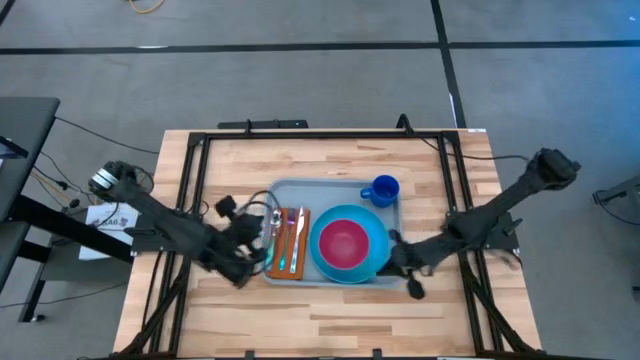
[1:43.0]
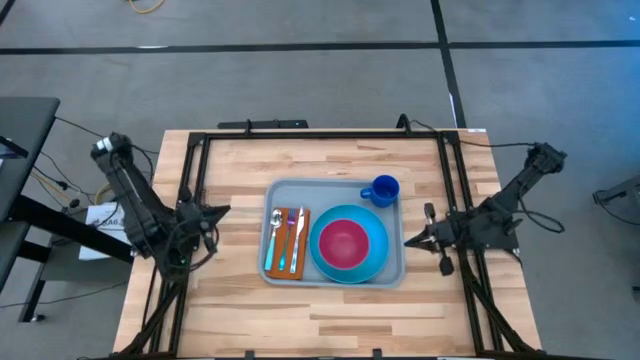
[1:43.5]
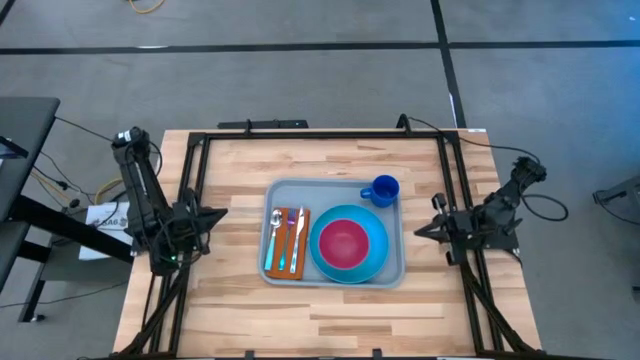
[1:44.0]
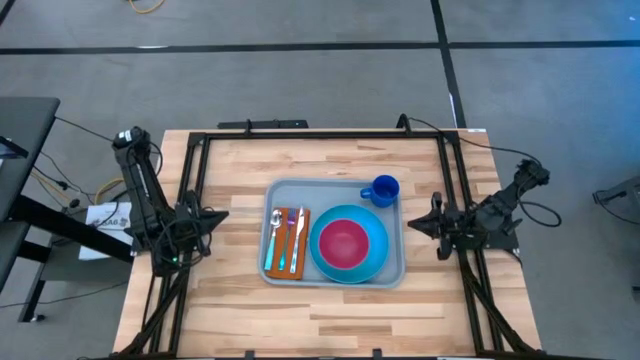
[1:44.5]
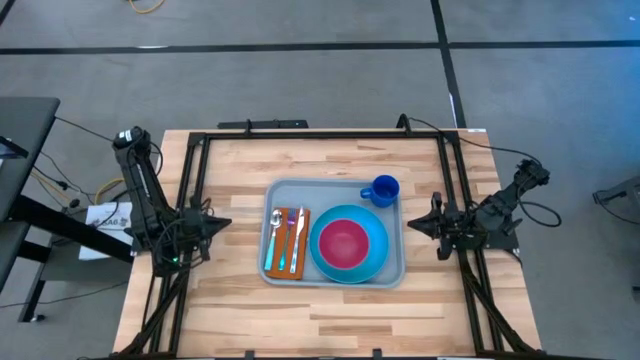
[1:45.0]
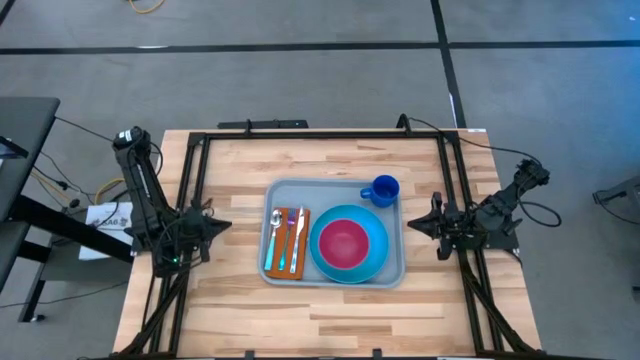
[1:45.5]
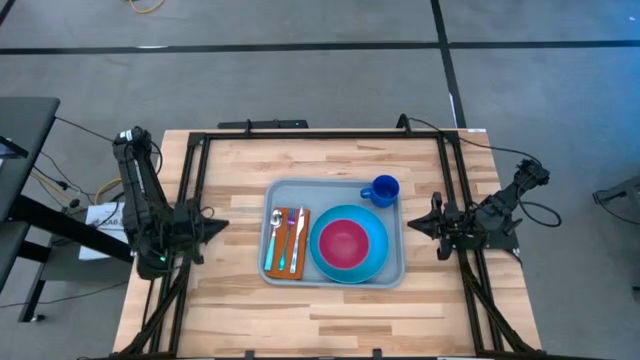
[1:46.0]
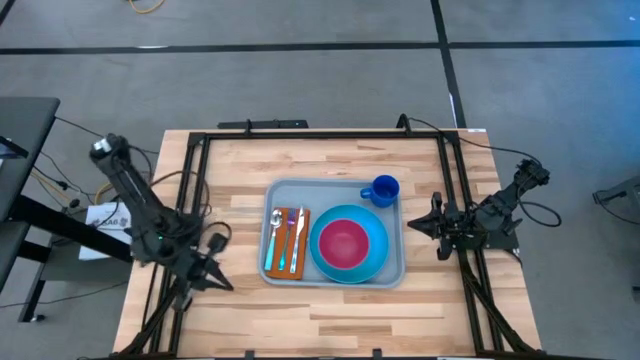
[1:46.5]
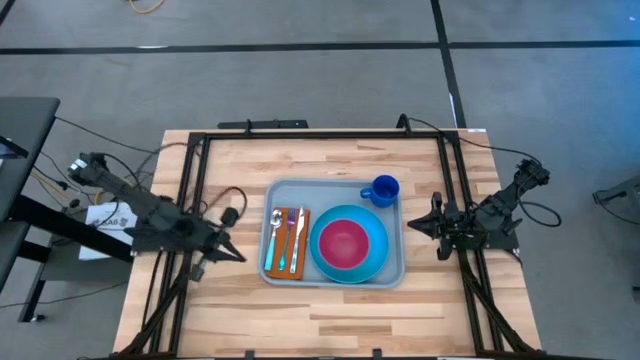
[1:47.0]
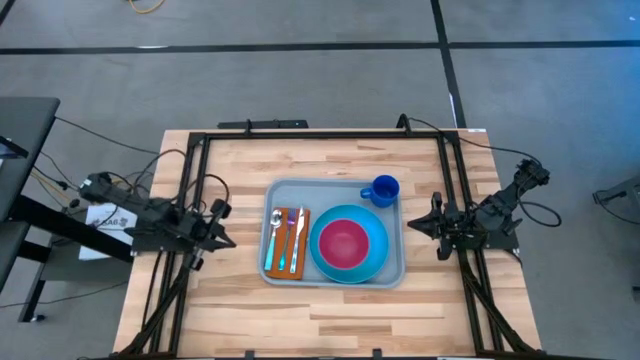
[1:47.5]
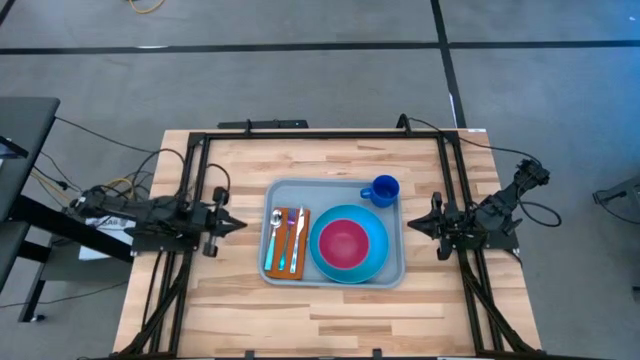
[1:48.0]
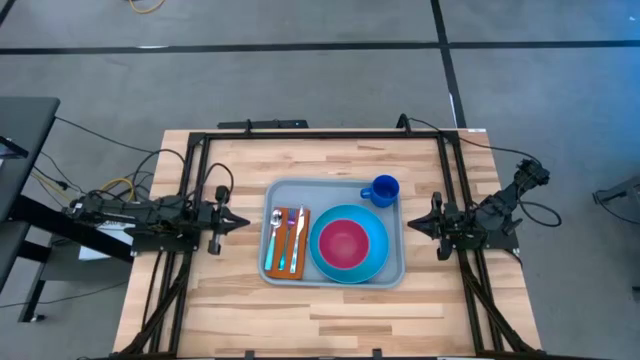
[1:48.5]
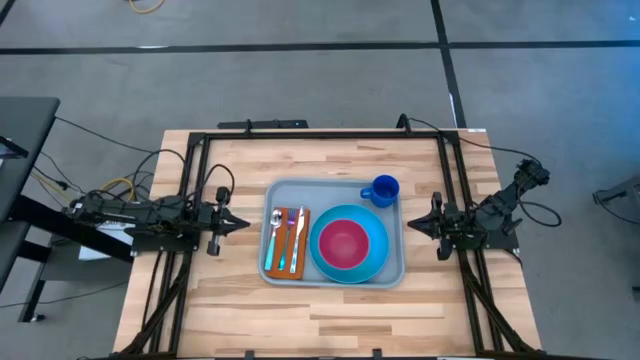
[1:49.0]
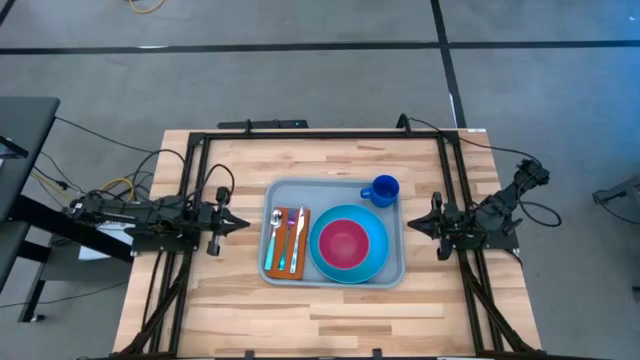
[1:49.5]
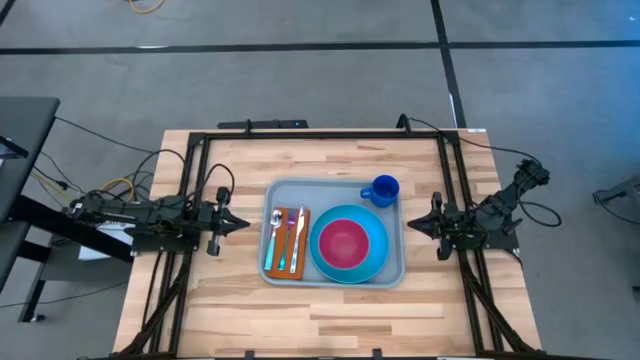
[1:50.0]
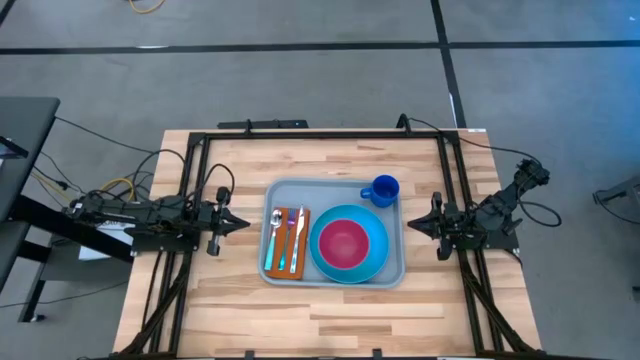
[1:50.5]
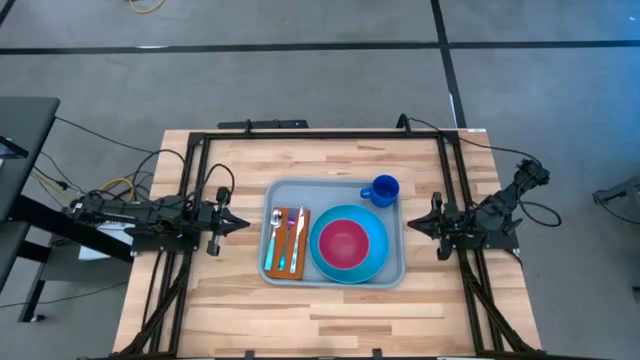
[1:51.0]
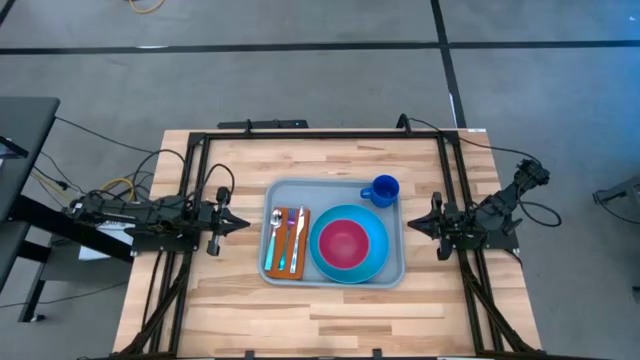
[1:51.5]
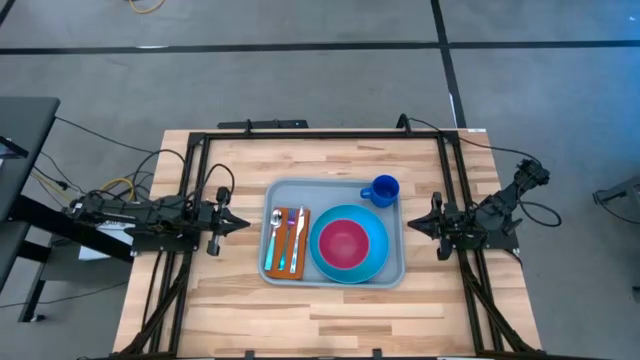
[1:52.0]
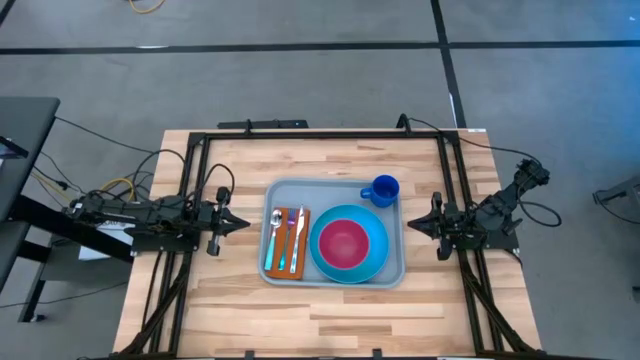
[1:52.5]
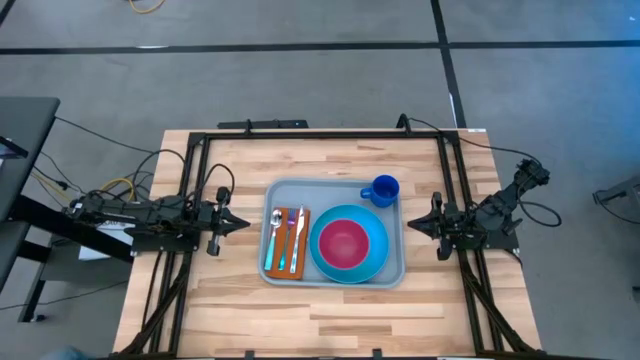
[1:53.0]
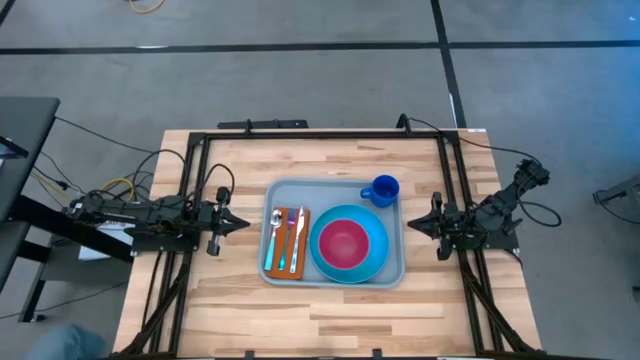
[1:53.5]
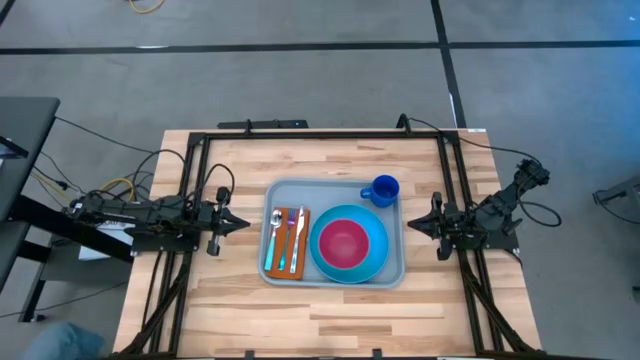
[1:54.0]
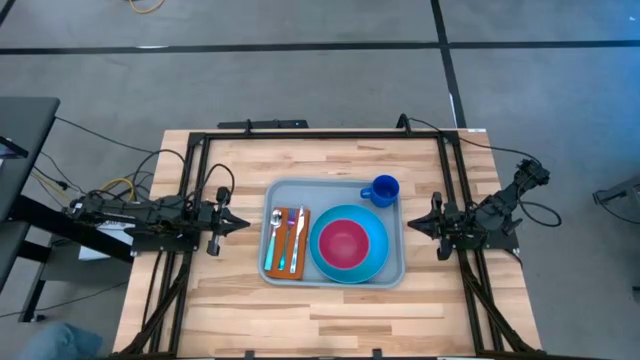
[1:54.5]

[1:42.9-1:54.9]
Task: Set up tray
Return to Home Position

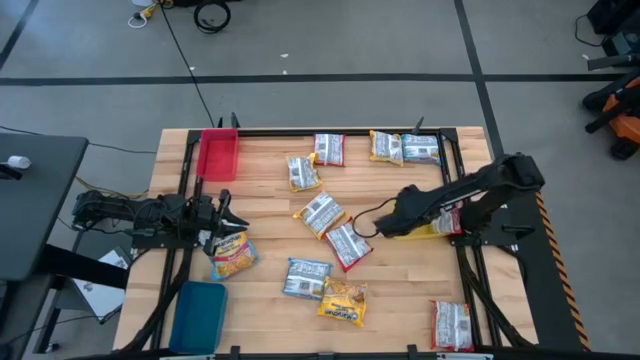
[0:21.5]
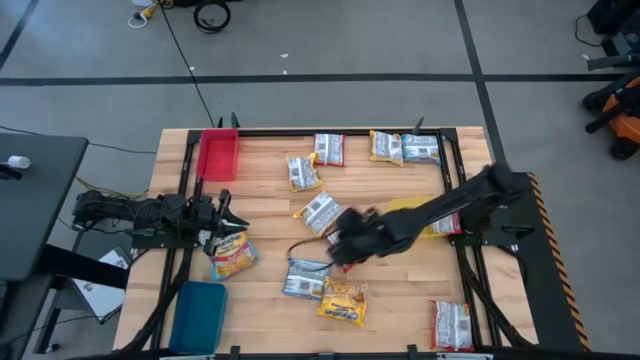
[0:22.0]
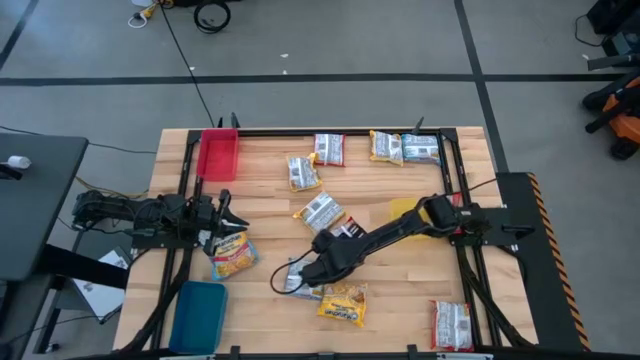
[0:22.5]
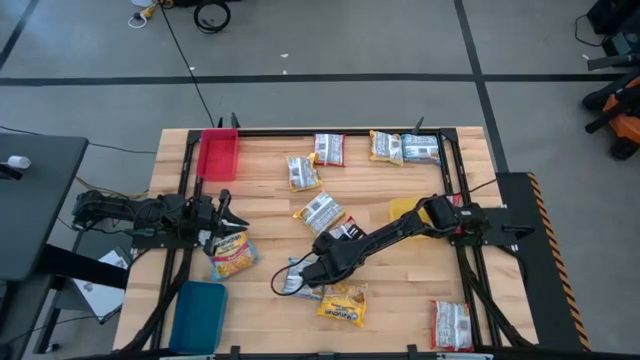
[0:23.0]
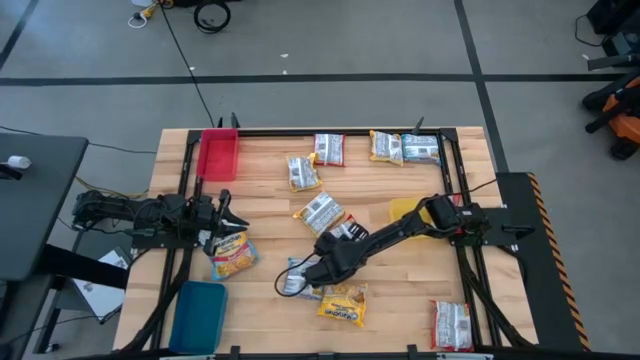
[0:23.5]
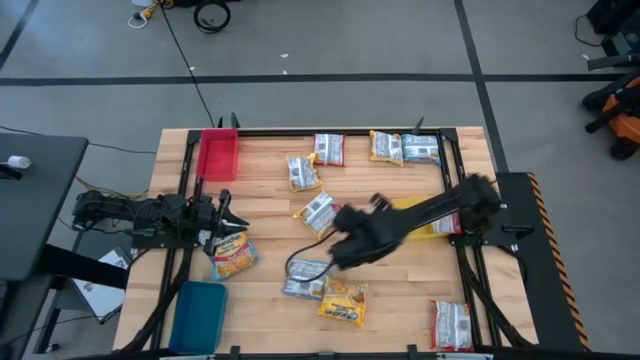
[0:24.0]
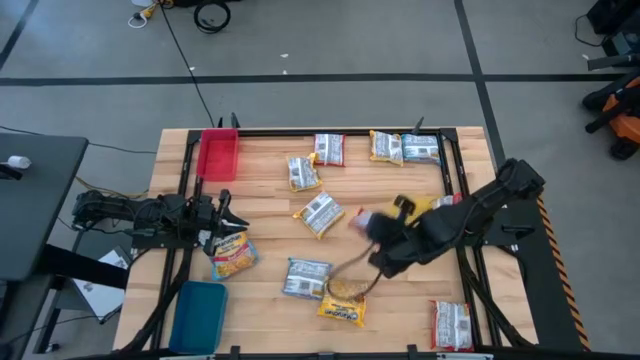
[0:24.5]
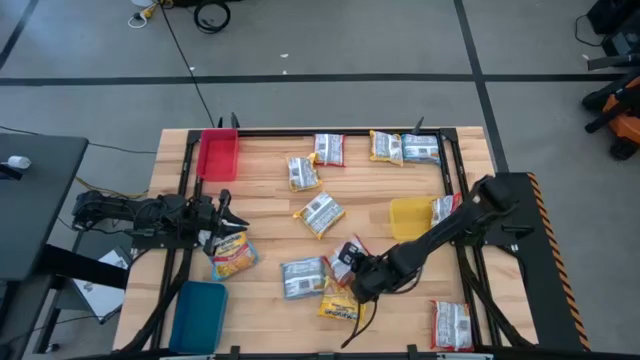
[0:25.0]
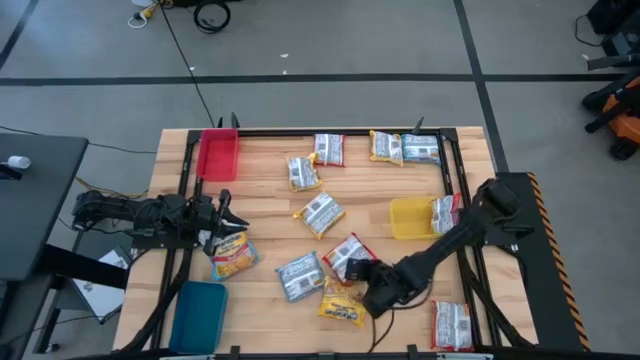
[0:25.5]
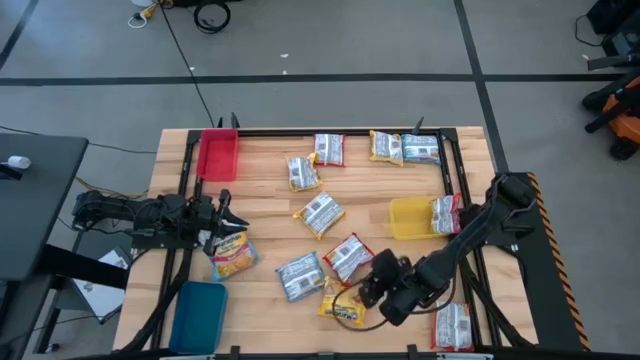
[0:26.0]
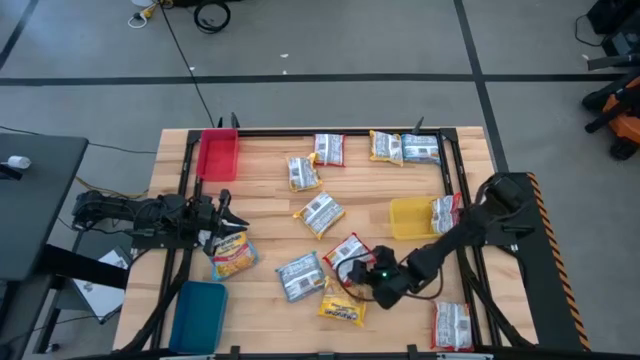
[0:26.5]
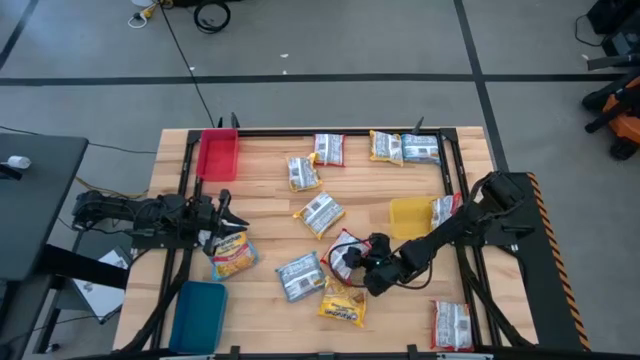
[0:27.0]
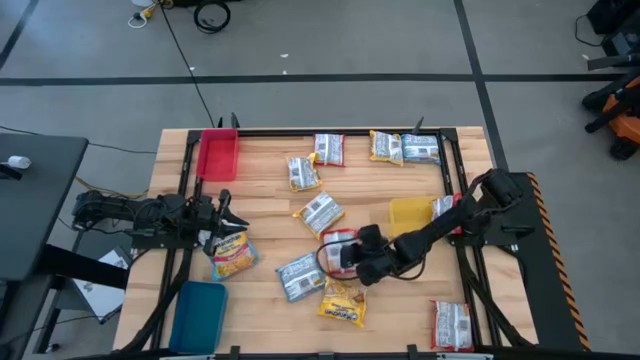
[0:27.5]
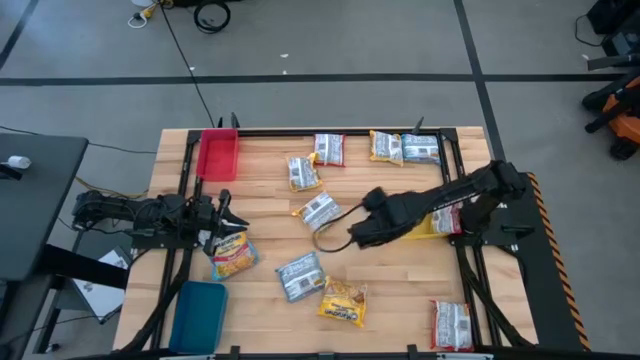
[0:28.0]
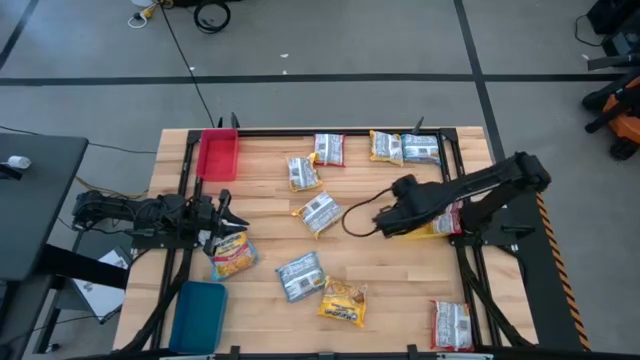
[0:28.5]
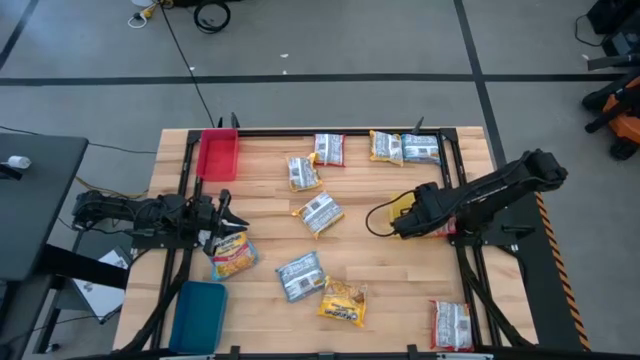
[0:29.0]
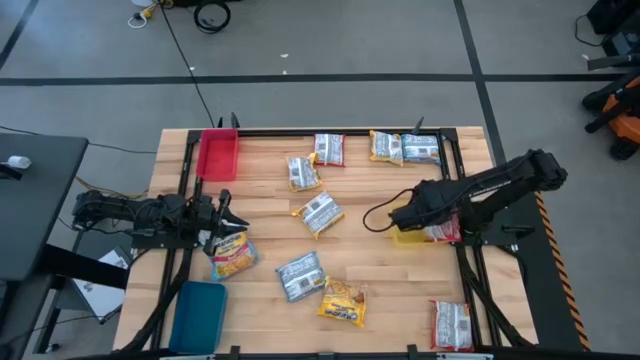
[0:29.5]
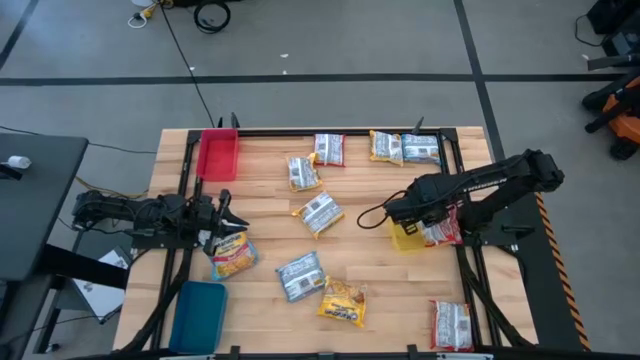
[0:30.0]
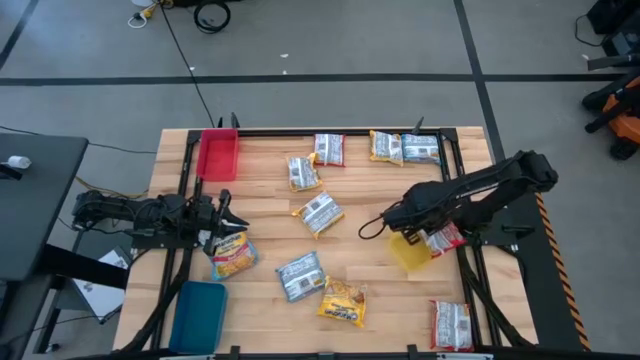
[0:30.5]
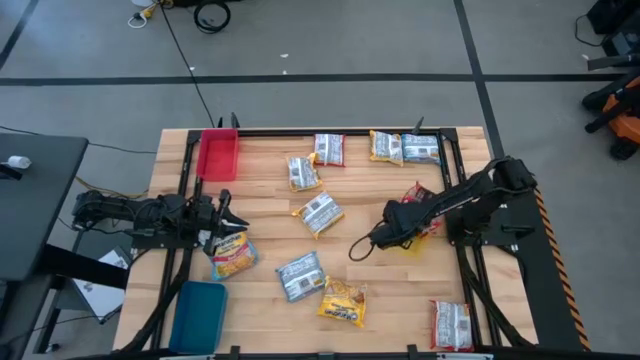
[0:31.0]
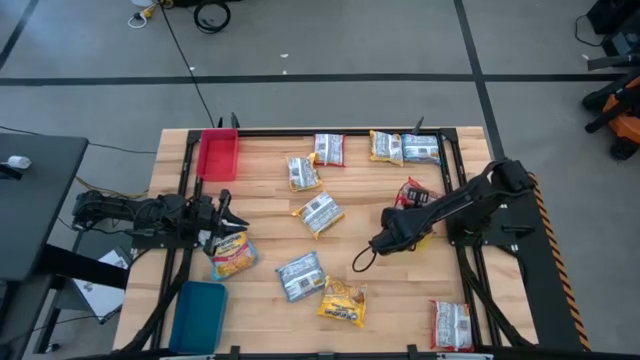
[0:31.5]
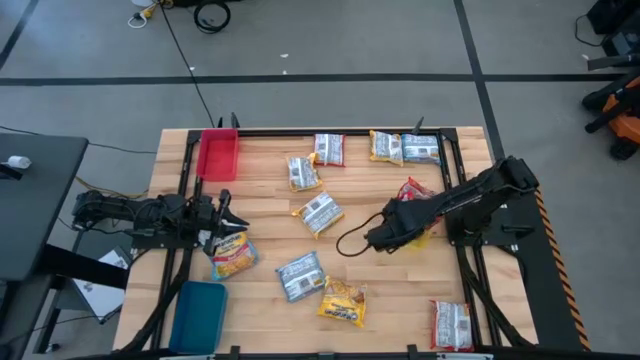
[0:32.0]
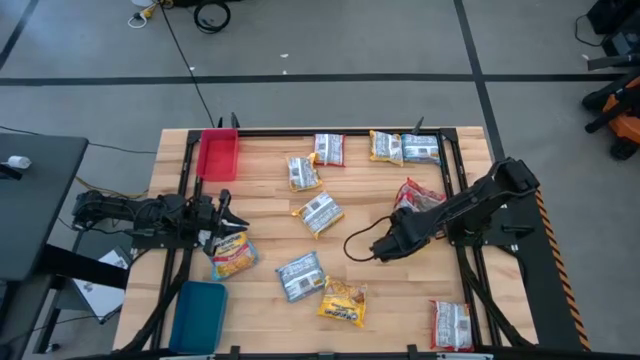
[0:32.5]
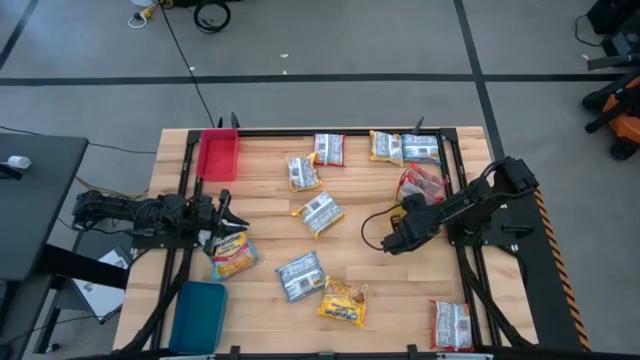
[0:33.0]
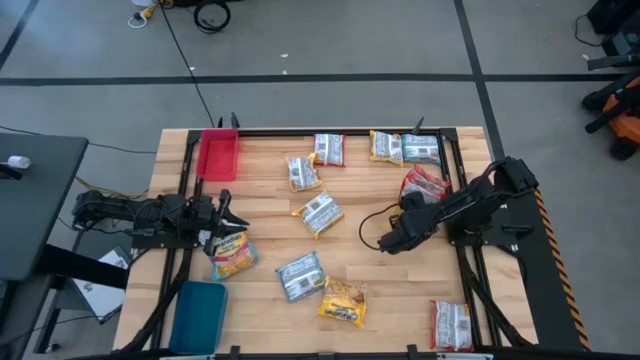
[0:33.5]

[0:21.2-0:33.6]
Task: Sort Maruchan noodles
Put the red noodle pack into the yellow bin
